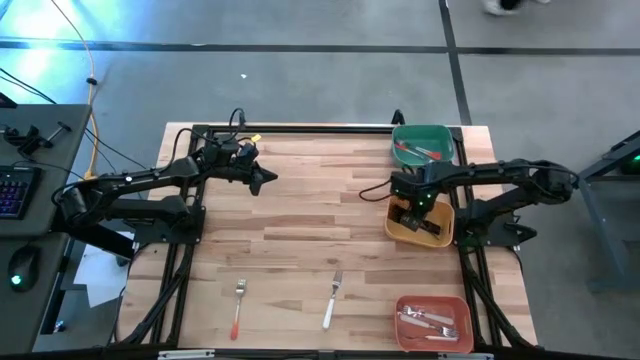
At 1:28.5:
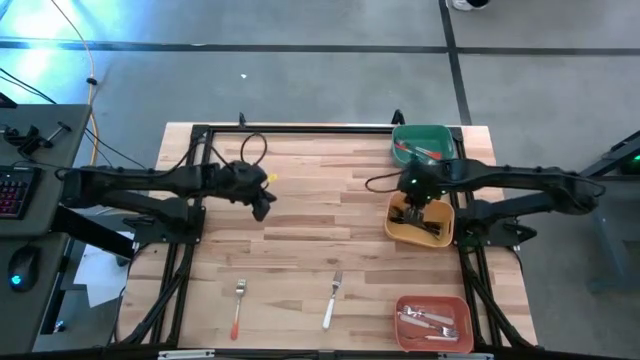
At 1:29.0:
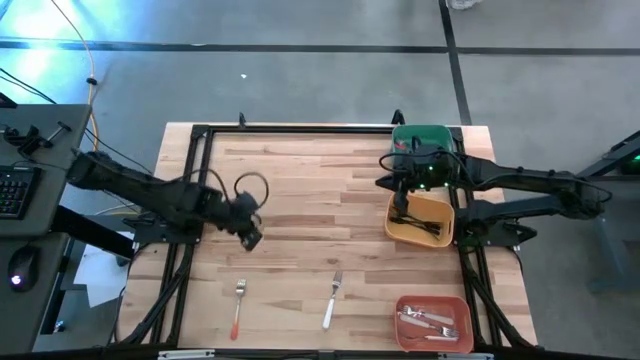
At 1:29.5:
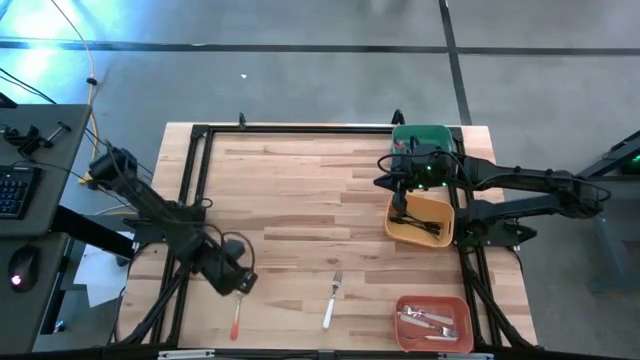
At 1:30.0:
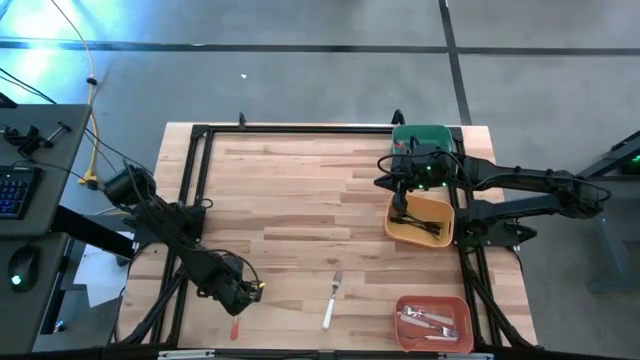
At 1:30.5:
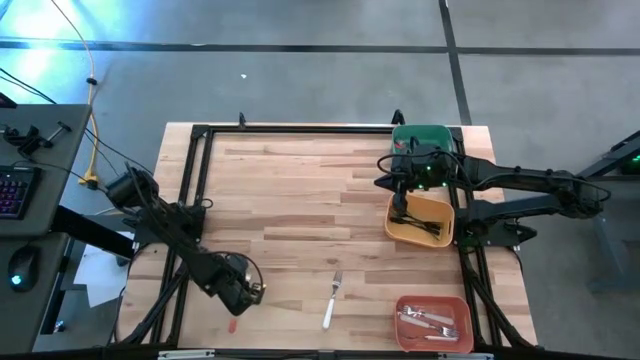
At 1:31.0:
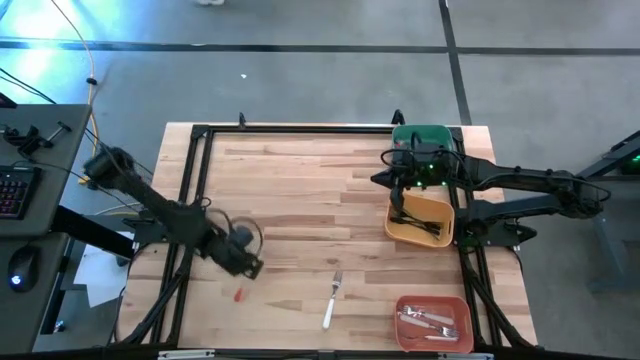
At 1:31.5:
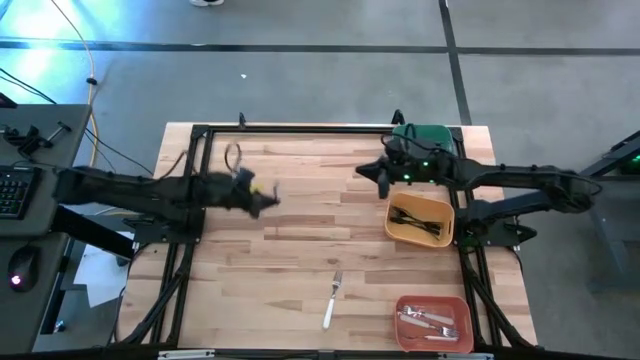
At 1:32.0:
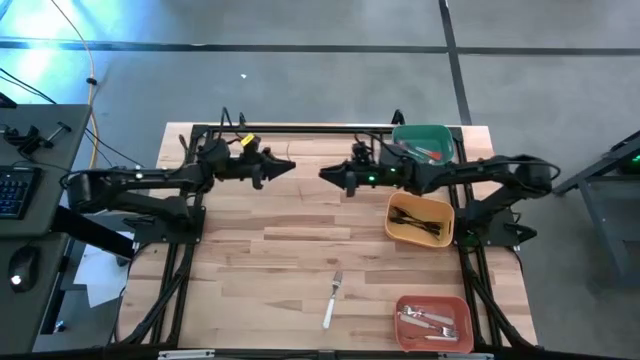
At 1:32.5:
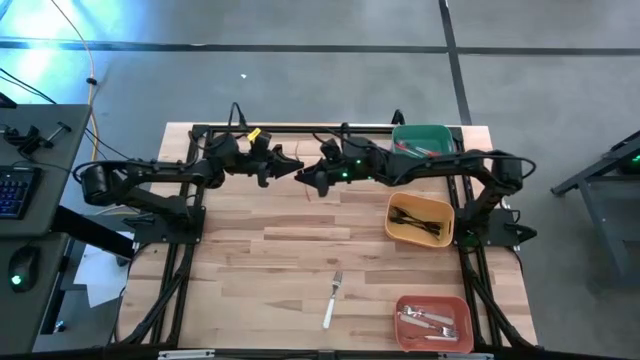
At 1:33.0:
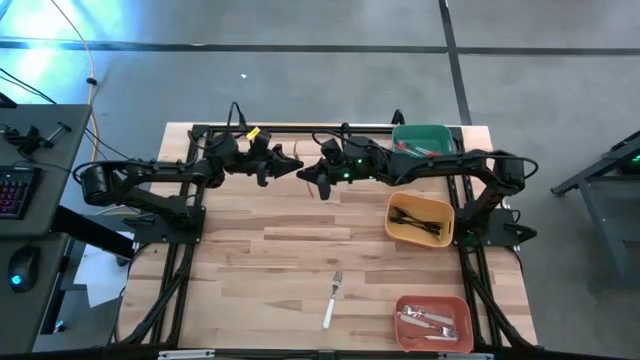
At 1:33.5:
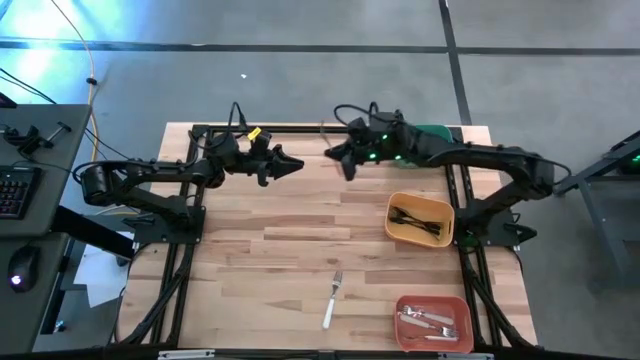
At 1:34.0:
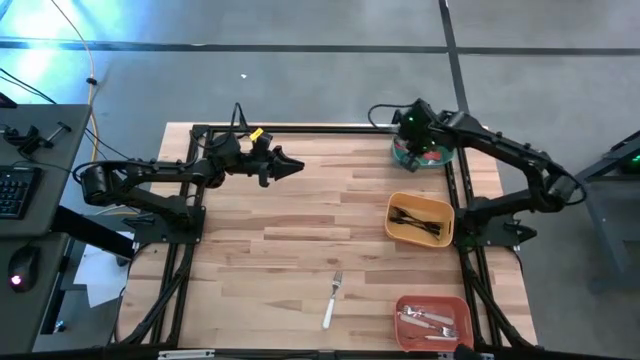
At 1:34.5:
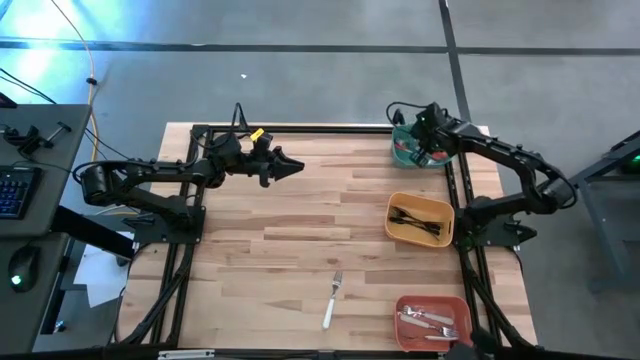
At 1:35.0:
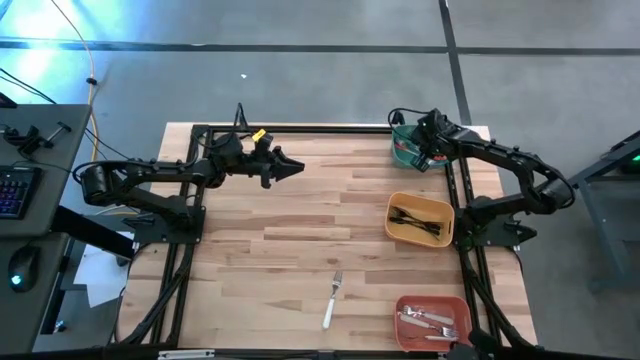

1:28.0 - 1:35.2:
Task: Sort silverware by color (type)
Put the orange fork into the green bin

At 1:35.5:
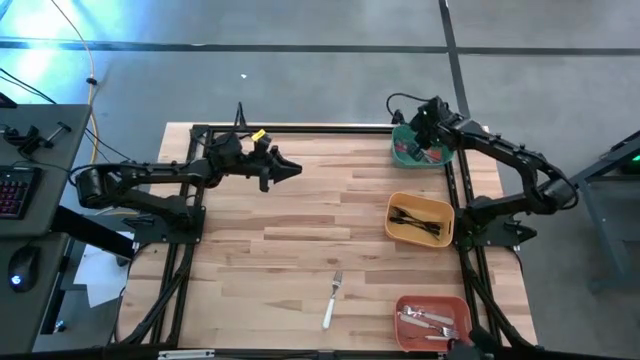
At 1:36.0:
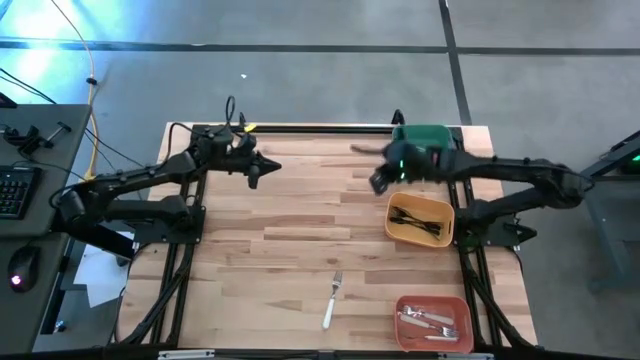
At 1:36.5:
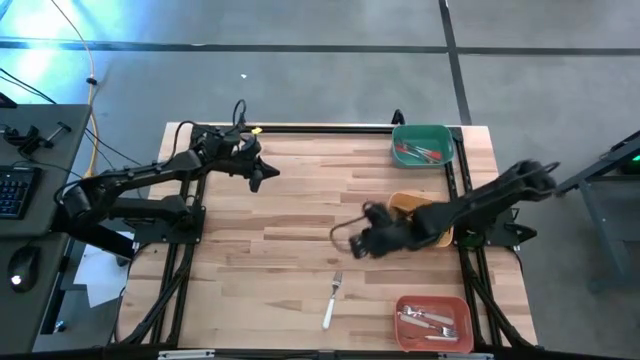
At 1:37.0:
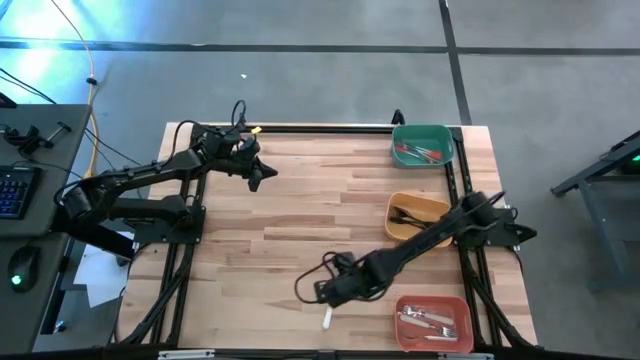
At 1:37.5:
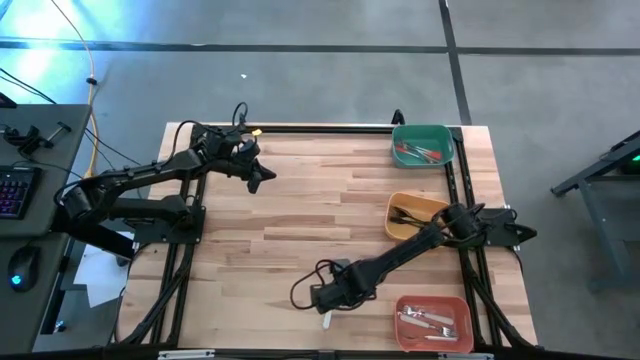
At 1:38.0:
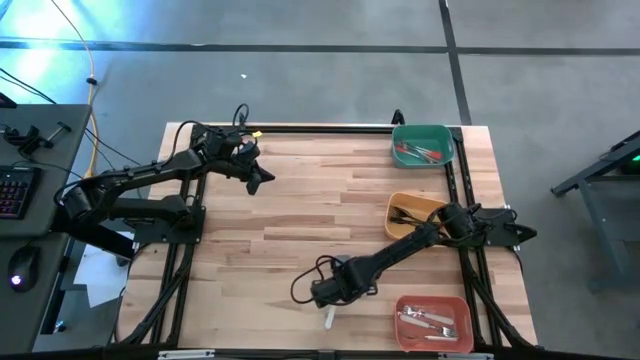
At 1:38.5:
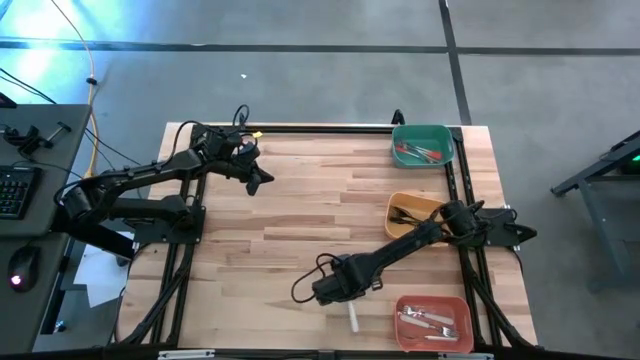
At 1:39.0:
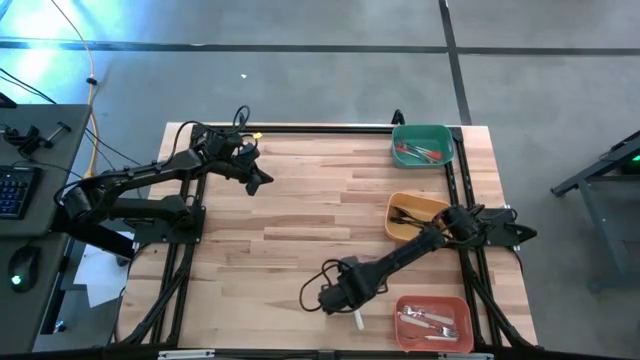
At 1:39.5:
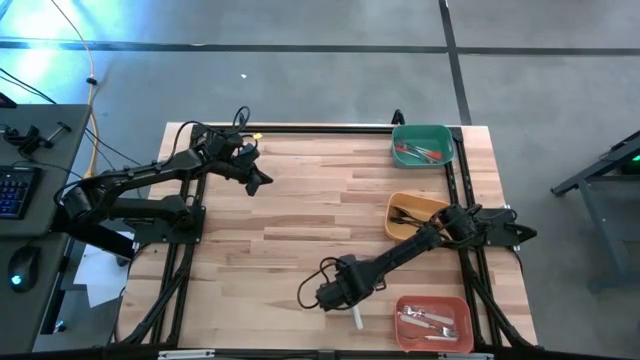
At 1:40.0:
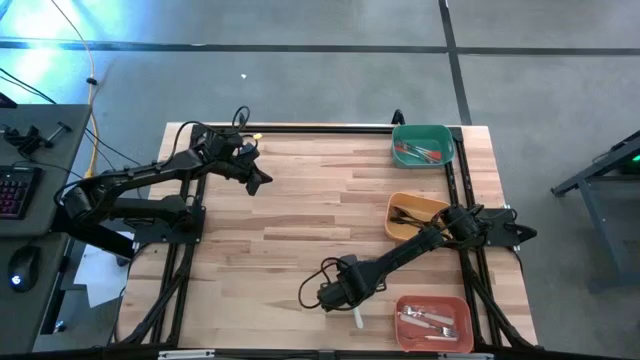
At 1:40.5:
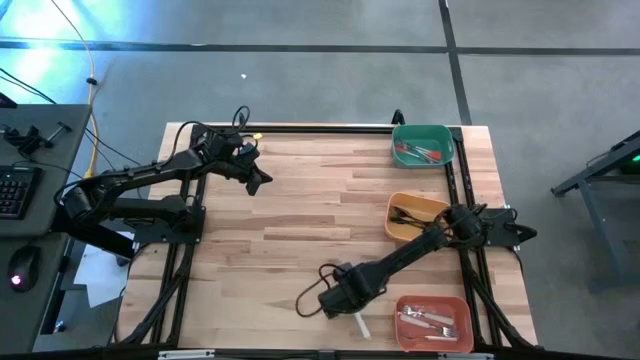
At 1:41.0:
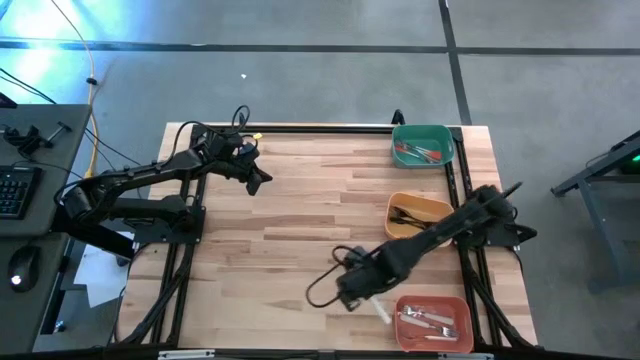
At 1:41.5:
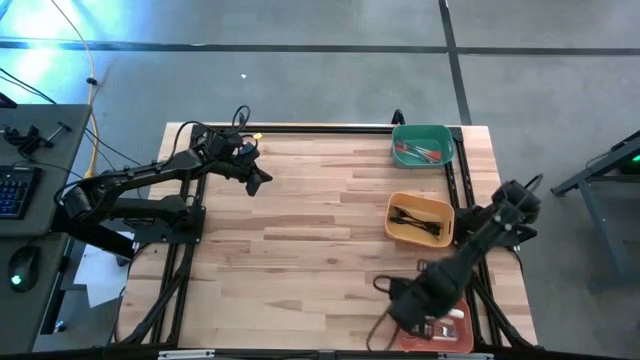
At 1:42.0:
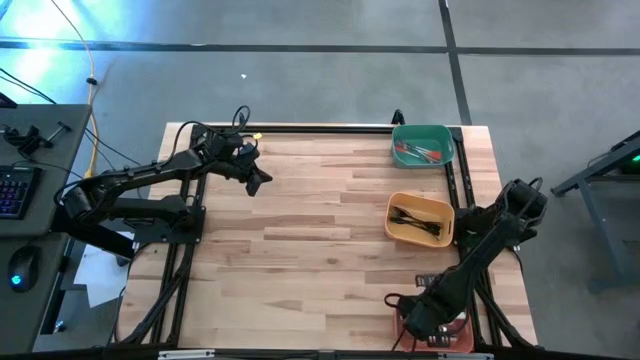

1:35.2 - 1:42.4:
Put the white fork into the orange bin

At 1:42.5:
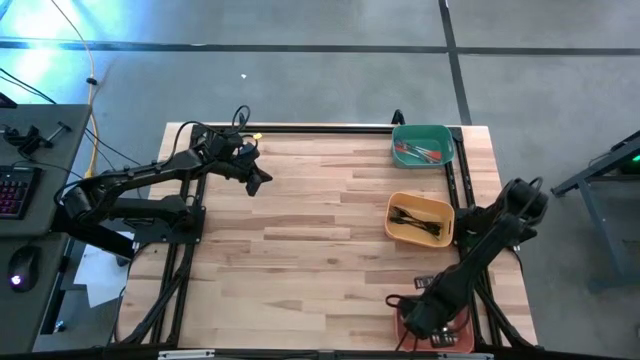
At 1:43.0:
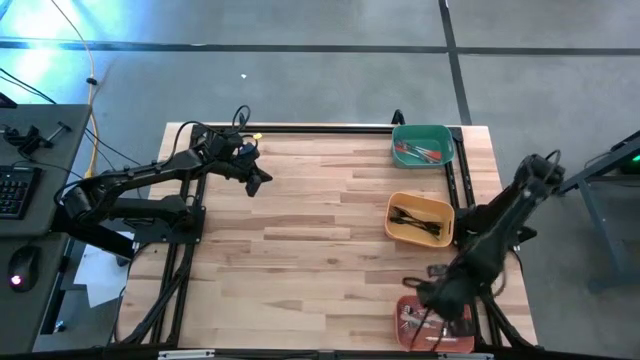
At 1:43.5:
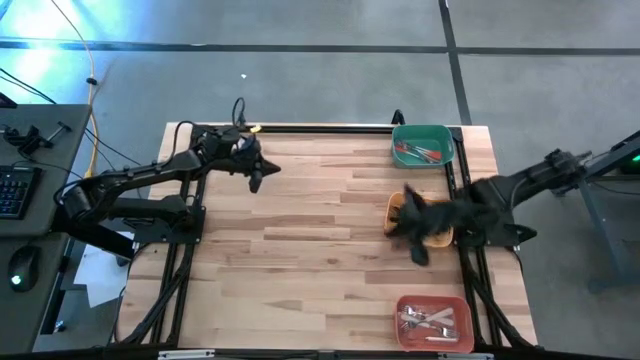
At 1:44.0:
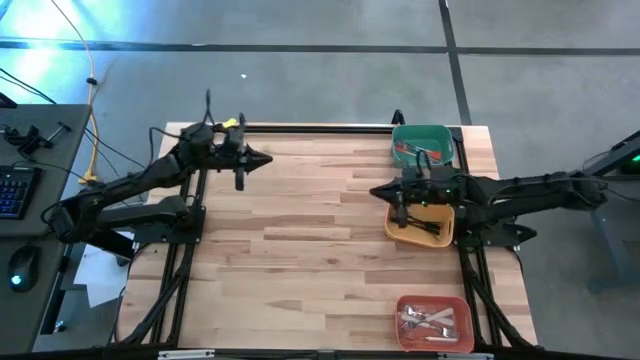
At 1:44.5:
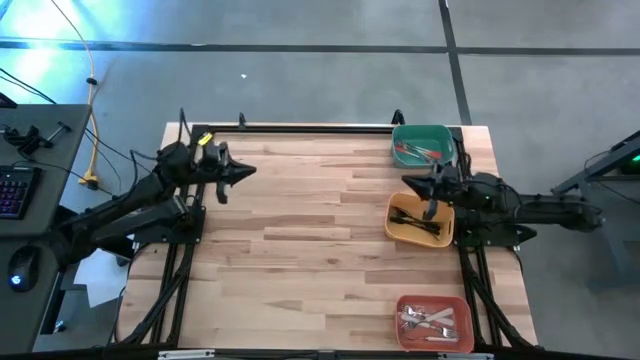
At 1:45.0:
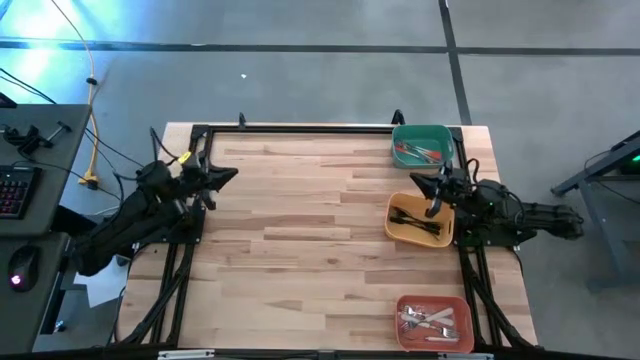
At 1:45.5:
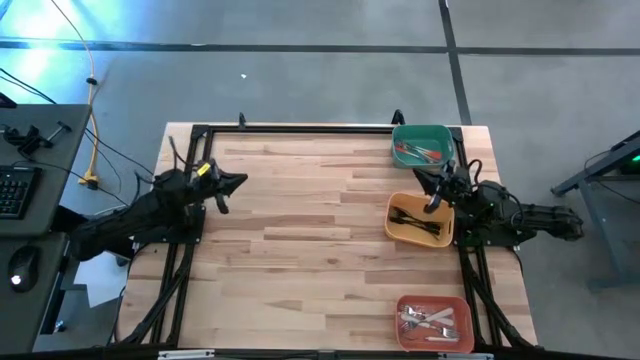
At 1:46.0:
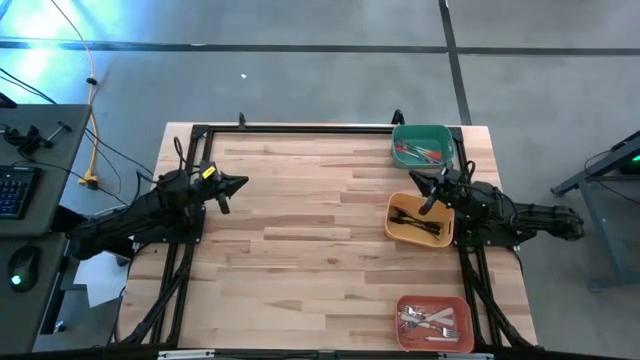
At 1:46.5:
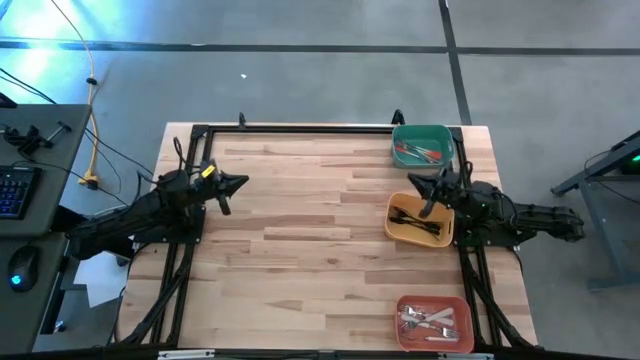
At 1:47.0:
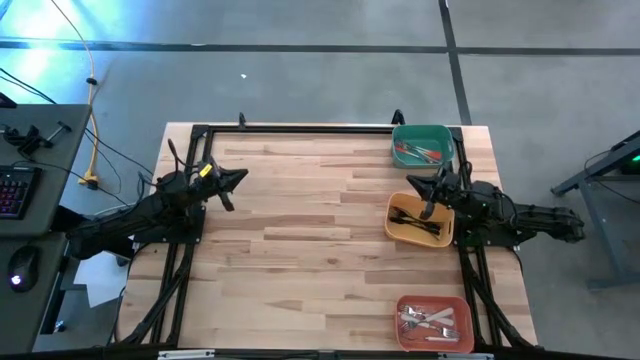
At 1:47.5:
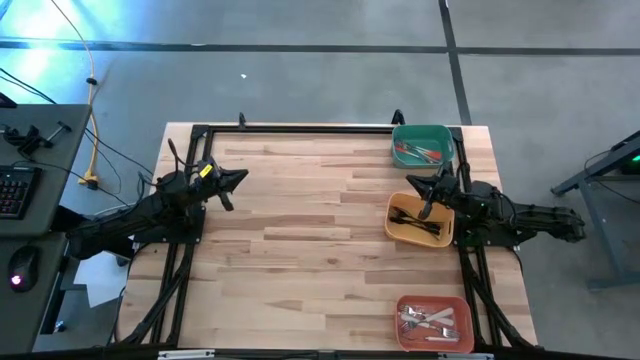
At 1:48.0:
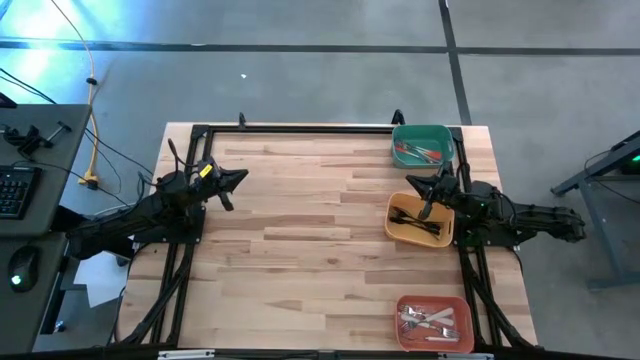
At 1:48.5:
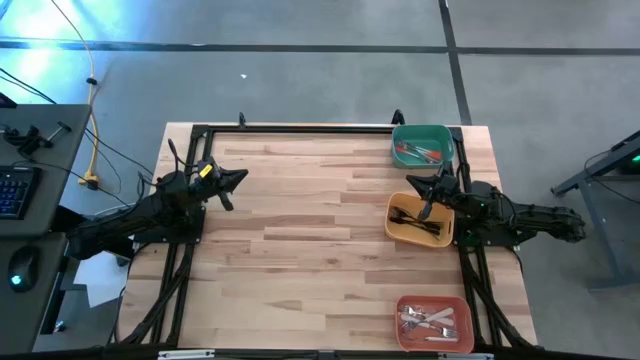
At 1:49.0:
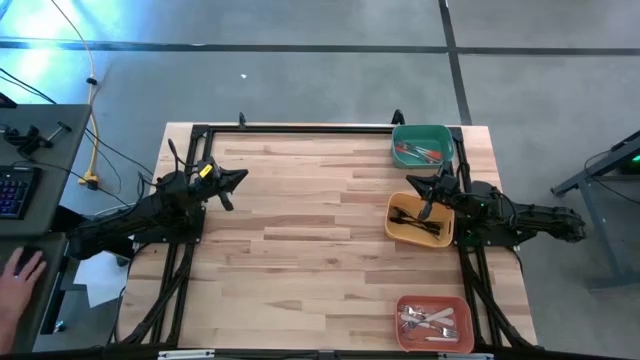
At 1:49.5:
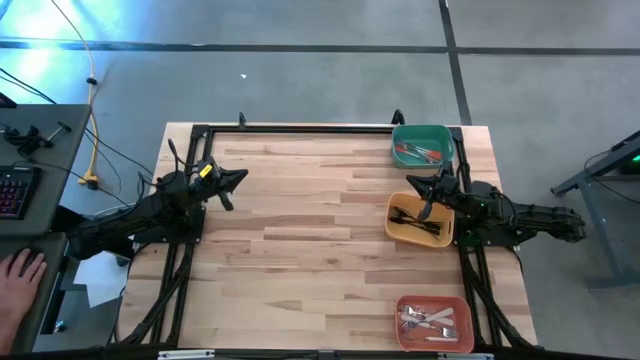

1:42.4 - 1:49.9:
Return to Home Position
